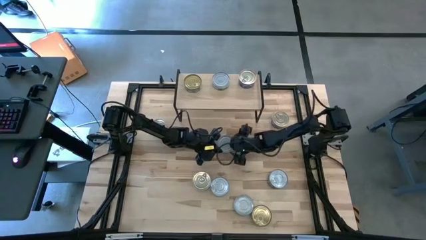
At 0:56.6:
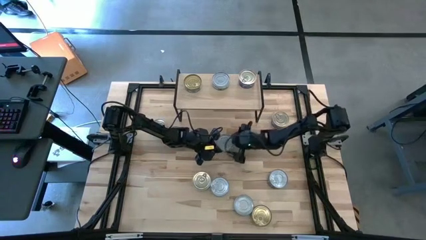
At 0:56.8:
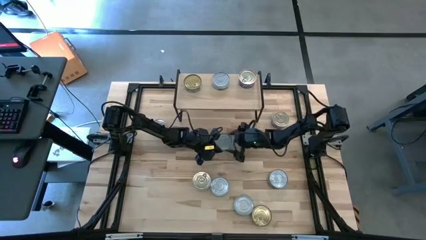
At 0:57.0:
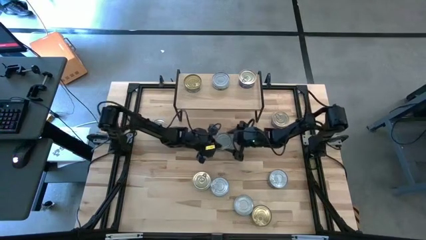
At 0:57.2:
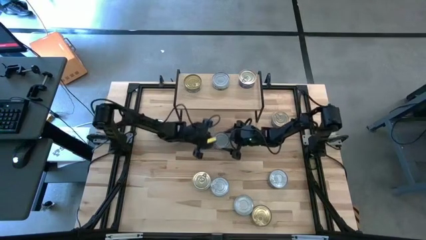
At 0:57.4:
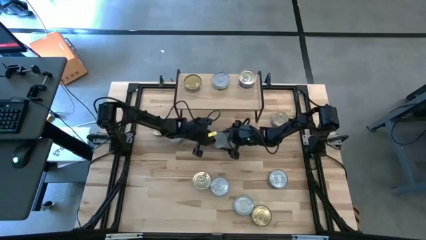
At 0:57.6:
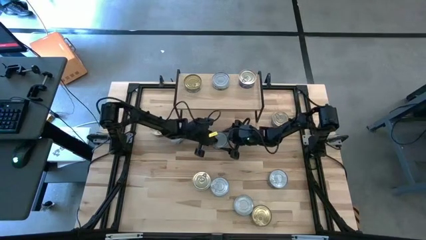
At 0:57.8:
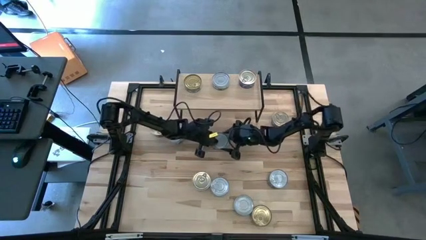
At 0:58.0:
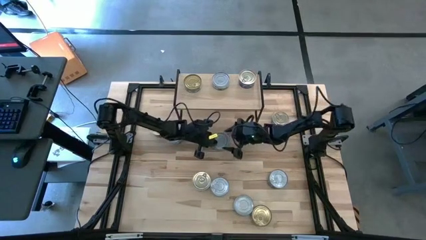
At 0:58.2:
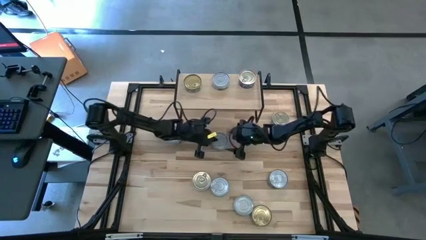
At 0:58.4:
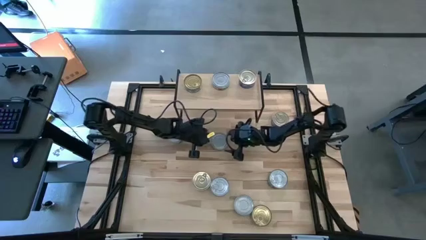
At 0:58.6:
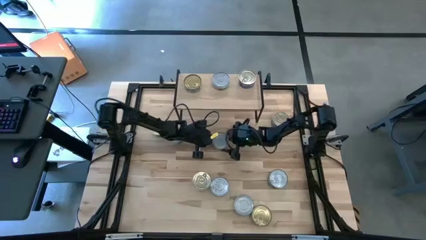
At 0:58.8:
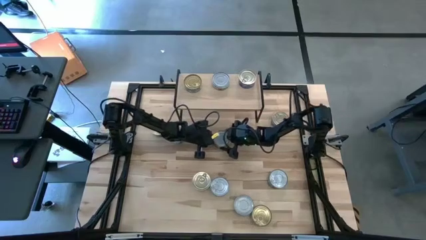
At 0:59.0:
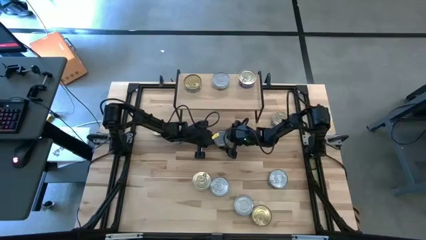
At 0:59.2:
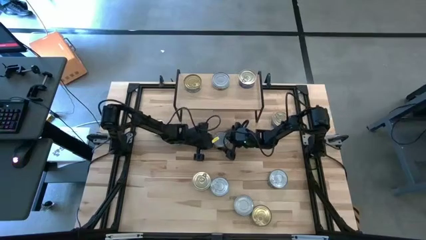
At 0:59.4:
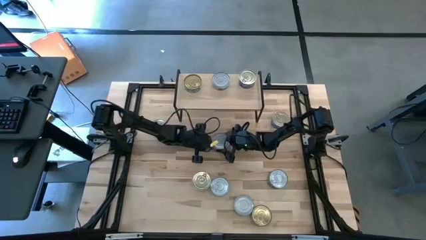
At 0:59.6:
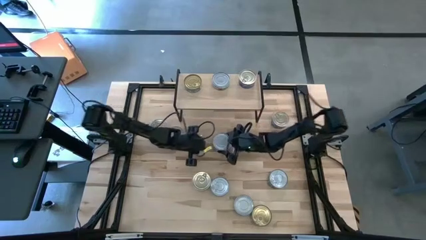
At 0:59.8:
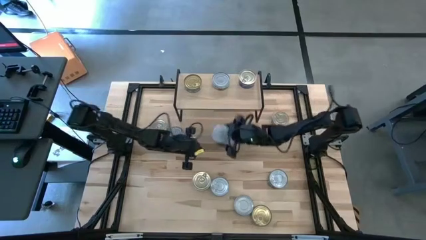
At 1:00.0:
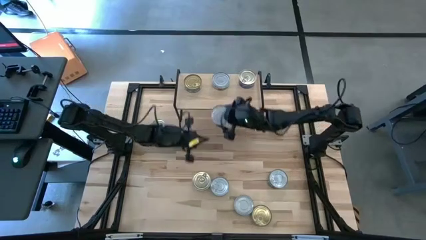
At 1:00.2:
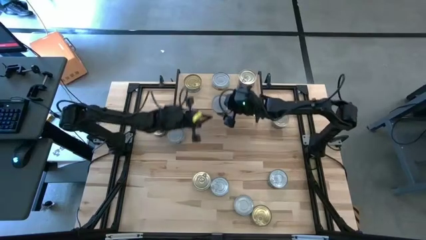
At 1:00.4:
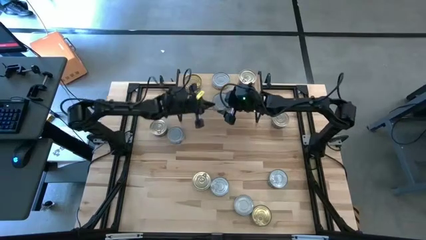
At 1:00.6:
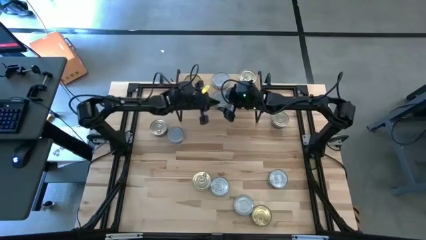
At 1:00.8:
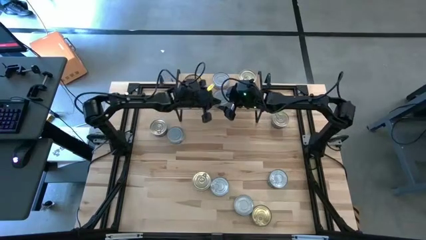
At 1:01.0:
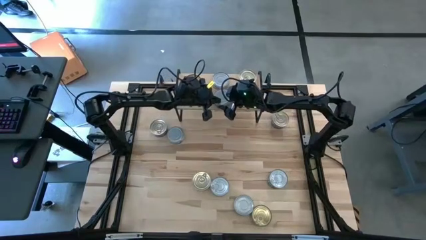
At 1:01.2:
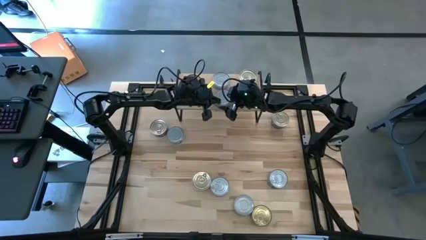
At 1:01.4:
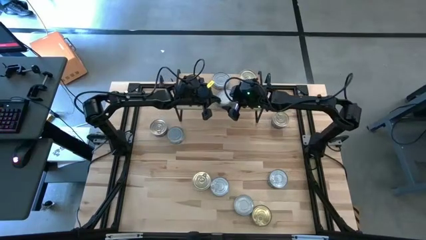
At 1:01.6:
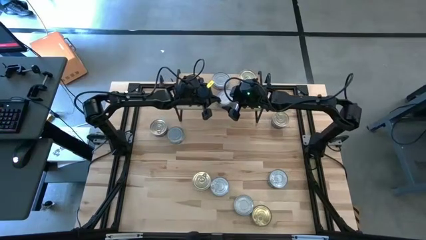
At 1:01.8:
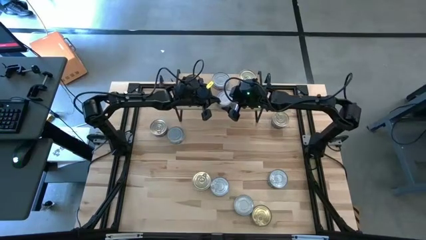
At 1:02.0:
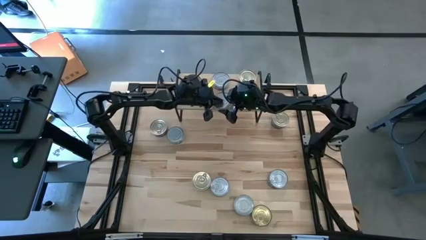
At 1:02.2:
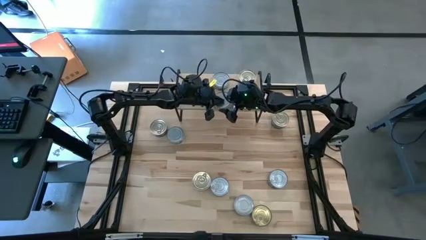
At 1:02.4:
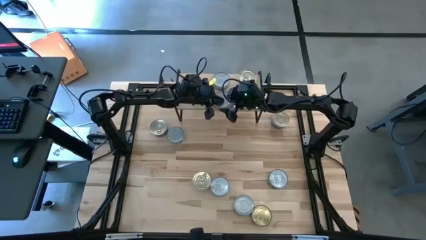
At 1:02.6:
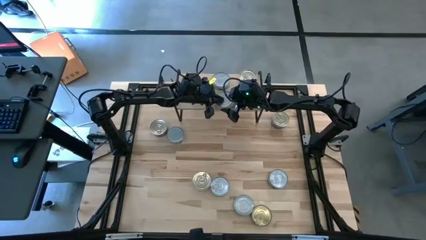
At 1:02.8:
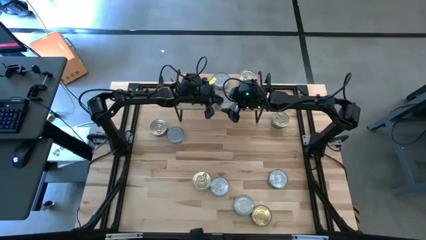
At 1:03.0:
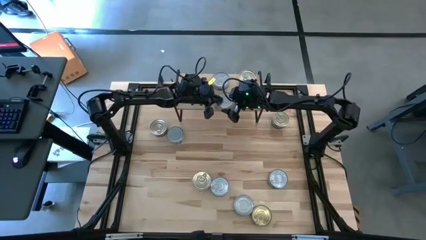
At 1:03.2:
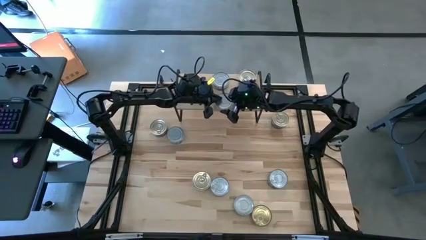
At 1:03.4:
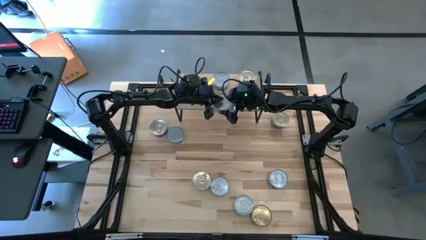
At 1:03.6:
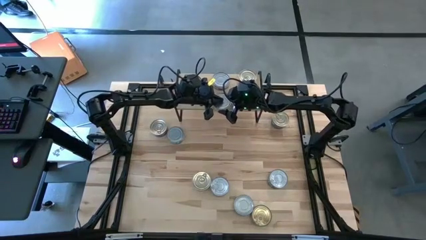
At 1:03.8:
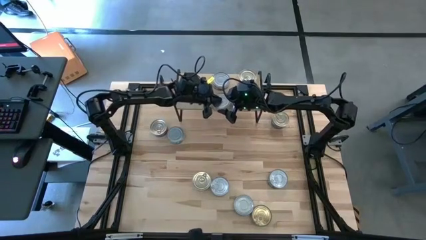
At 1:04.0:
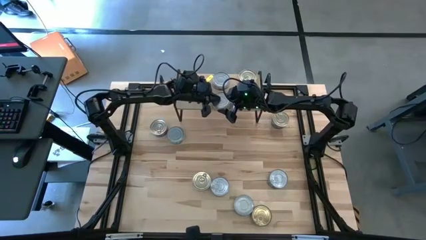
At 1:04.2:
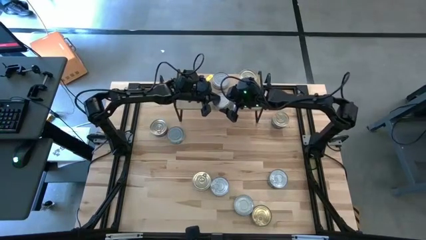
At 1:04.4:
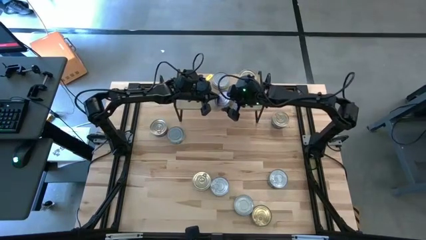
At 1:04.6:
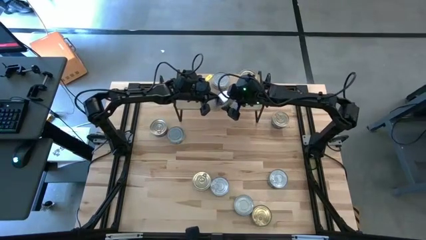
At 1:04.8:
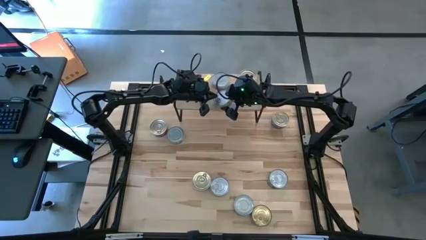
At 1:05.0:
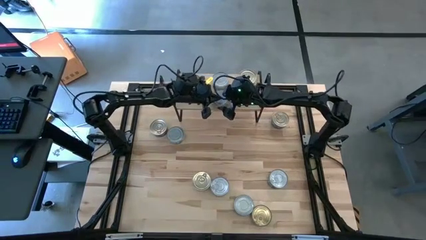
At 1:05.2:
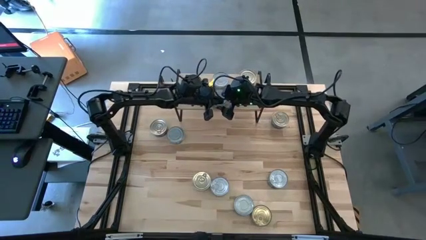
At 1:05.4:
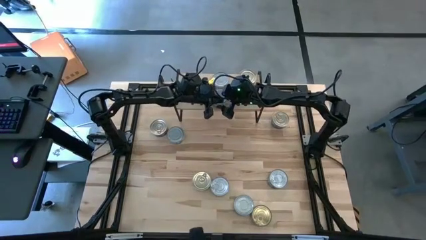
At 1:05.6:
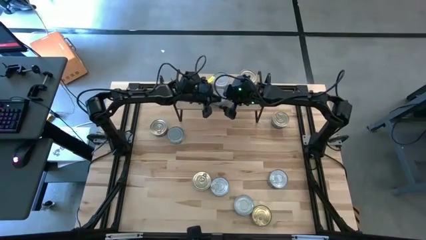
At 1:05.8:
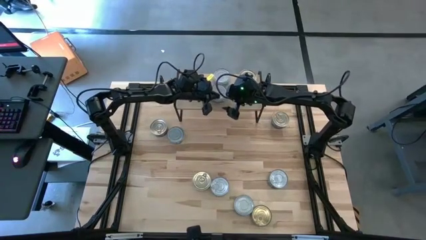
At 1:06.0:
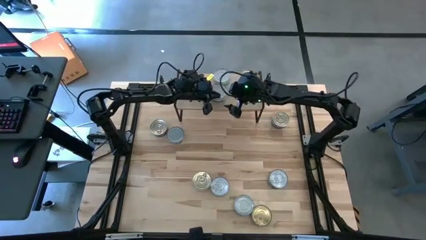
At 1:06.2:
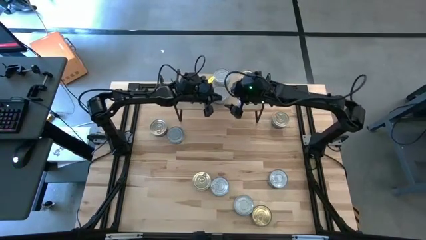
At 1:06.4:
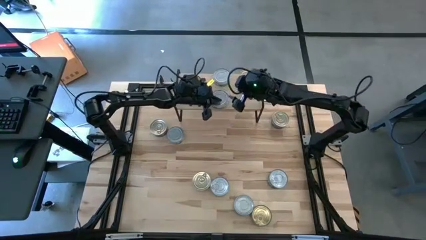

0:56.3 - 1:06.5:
Task: Stack canned seafood by type on shelf
Put the top right light green tuna can on the shelf aligned with the other light green can

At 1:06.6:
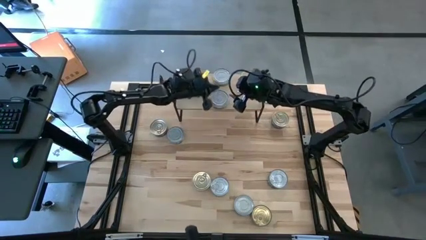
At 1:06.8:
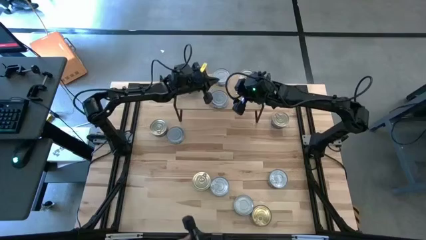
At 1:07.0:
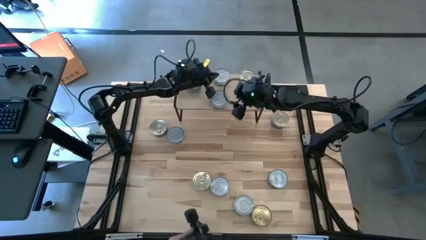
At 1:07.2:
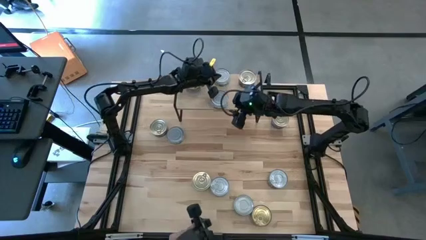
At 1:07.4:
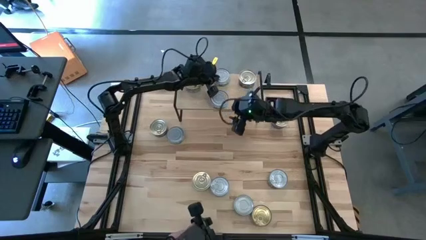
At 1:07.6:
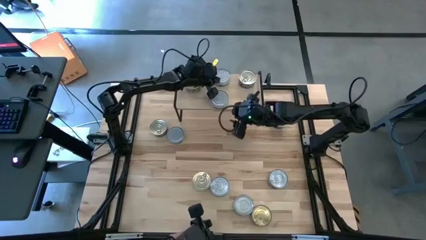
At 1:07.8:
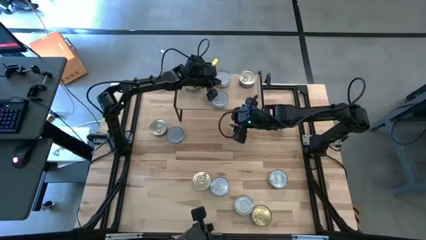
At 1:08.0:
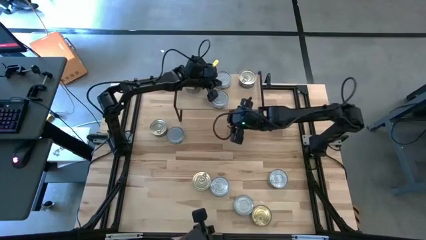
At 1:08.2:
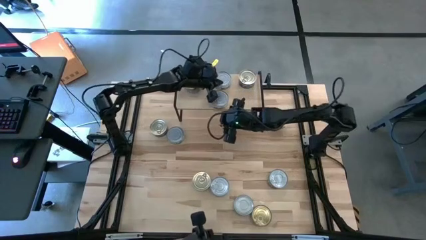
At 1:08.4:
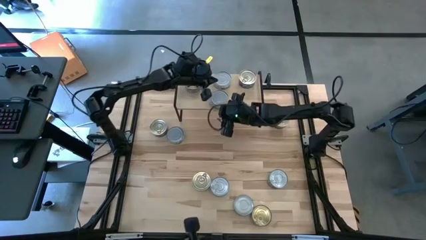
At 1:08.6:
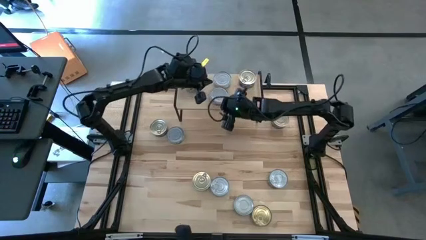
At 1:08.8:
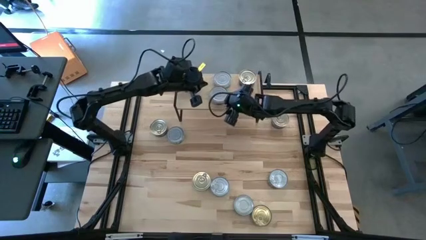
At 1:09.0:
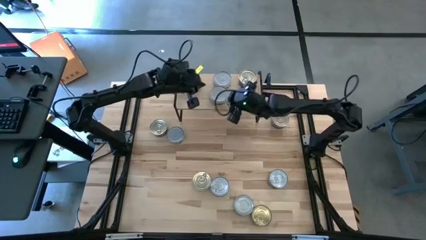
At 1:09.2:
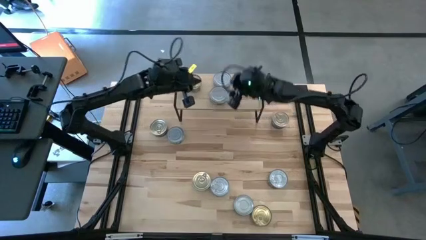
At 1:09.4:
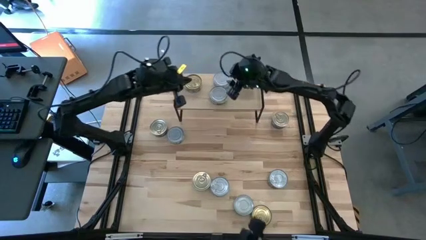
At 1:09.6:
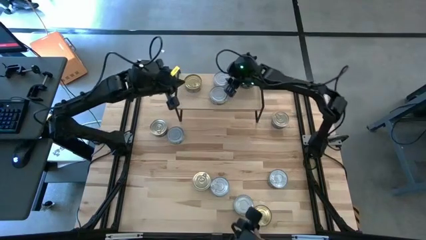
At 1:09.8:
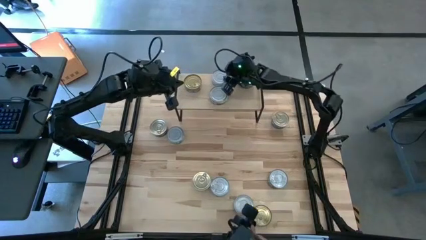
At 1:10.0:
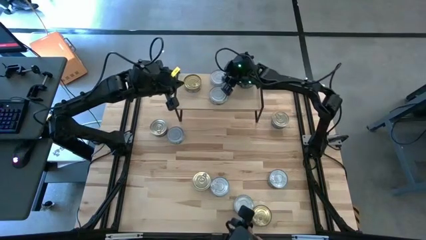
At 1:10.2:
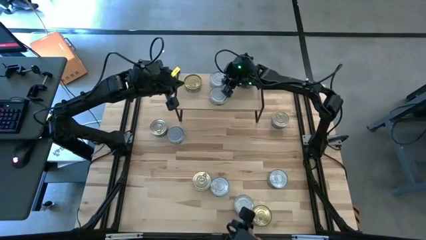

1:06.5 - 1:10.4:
Adjust the top light green can on the shelf
